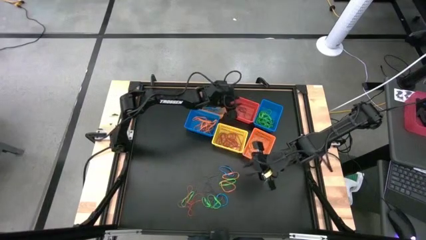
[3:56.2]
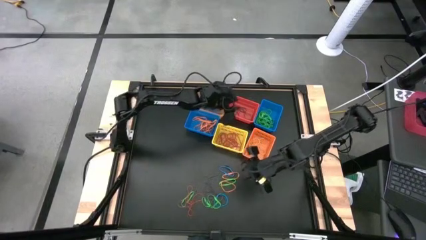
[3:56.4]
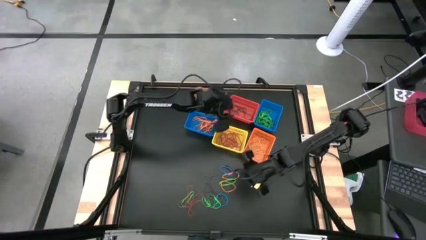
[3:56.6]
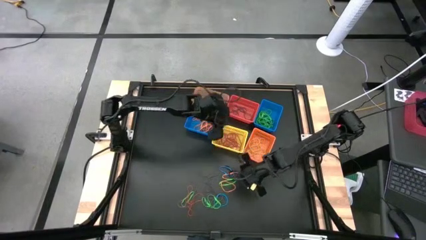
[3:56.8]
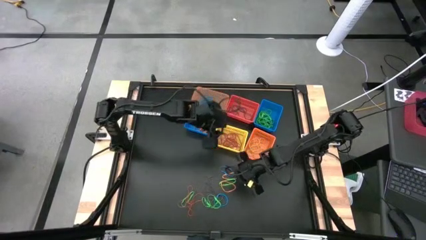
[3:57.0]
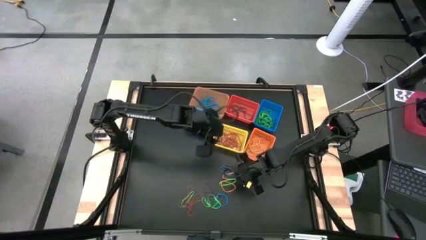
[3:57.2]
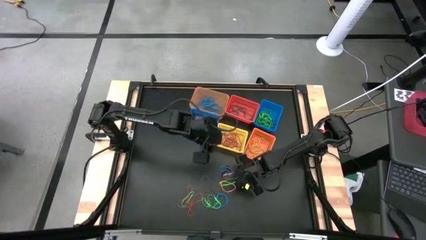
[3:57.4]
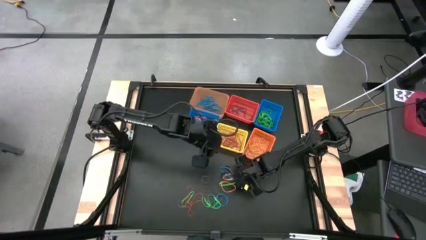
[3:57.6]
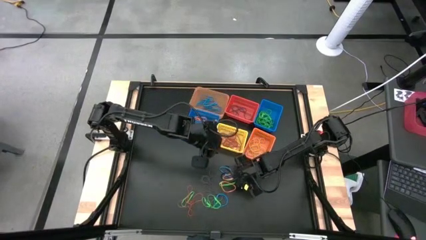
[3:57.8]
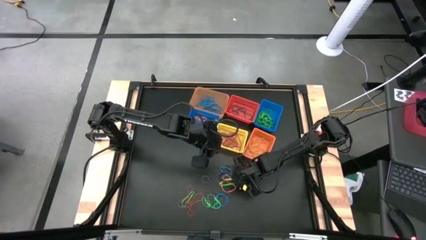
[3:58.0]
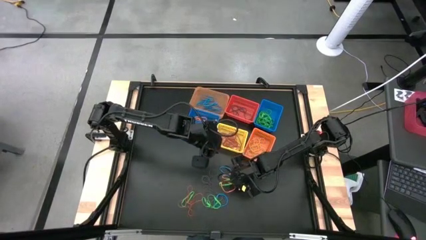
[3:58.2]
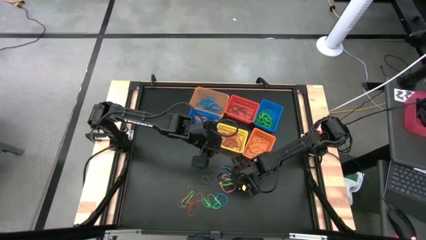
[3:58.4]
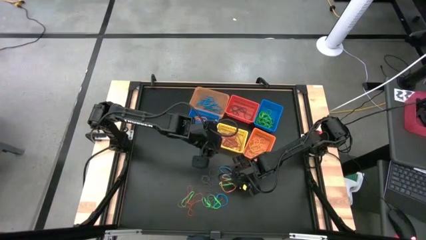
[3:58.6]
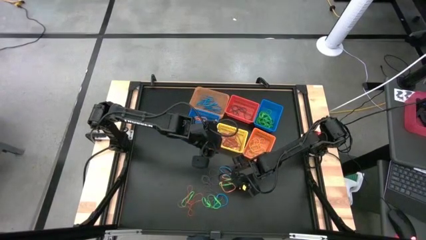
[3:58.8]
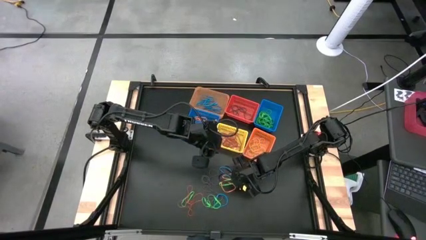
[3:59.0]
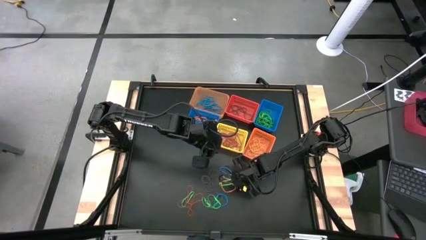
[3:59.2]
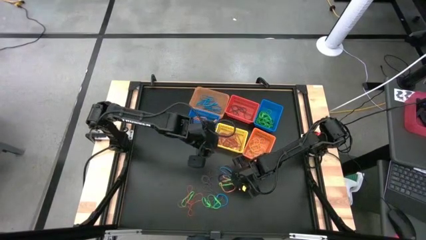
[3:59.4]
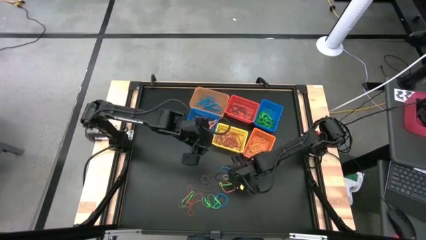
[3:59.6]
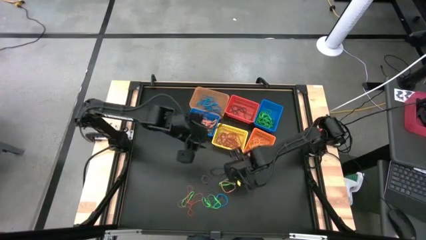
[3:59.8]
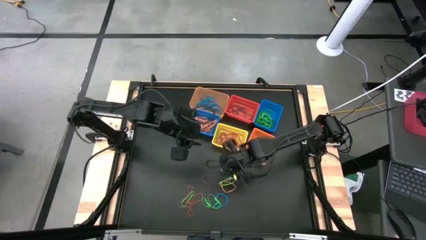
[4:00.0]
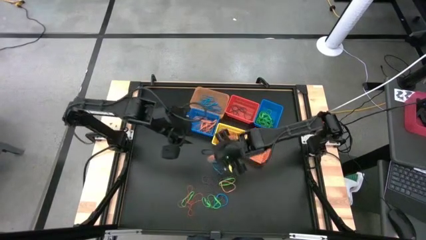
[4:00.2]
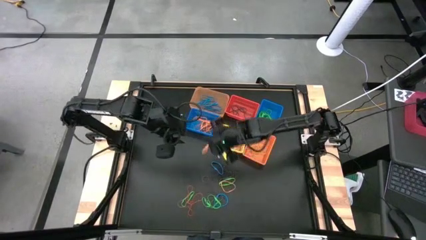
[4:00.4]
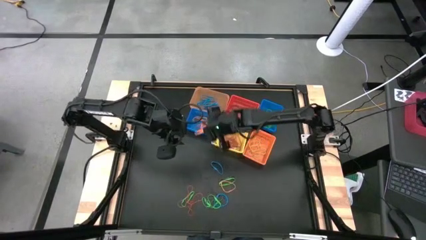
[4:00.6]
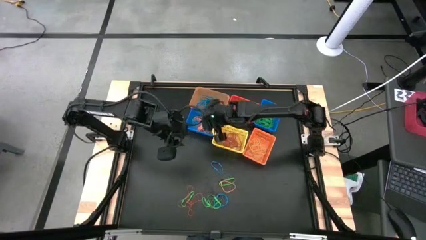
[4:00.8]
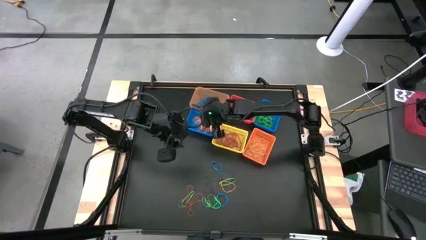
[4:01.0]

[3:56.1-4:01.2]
Task: Sort rubber bands into baskets
Put the orange rubber band into the left blue basket

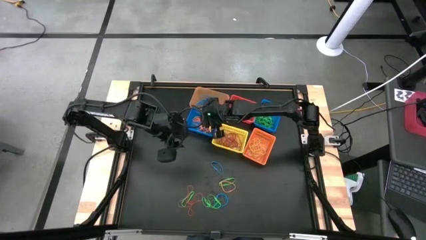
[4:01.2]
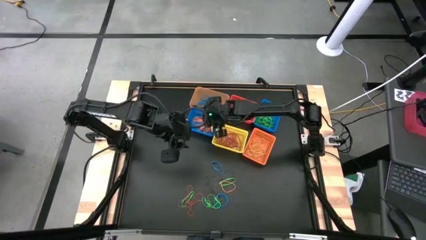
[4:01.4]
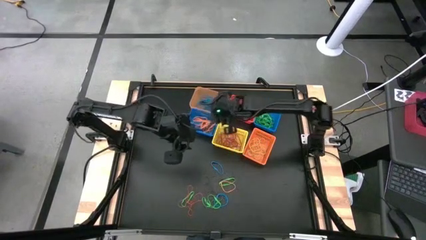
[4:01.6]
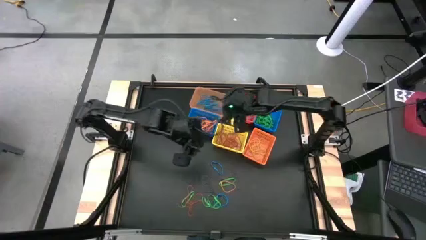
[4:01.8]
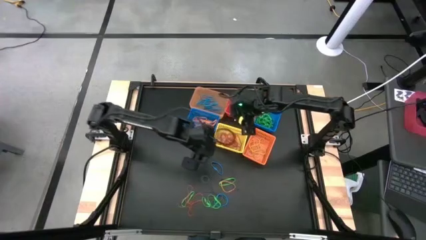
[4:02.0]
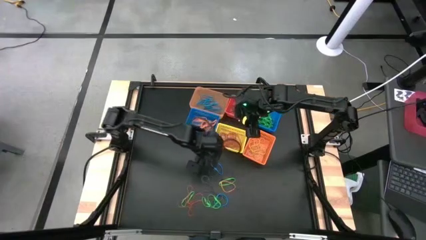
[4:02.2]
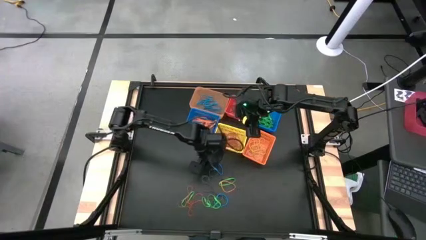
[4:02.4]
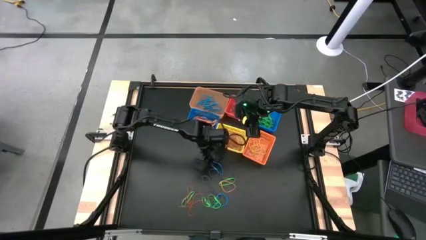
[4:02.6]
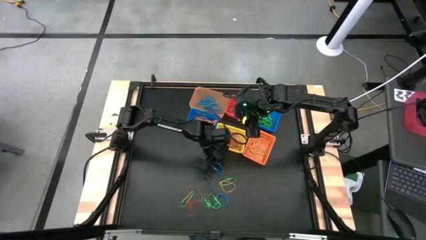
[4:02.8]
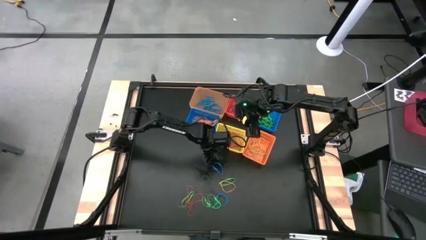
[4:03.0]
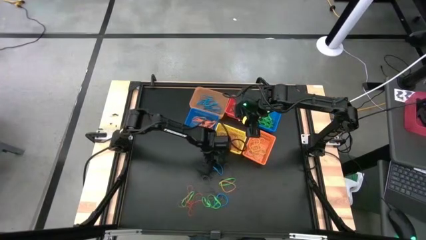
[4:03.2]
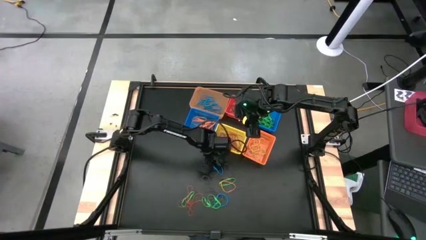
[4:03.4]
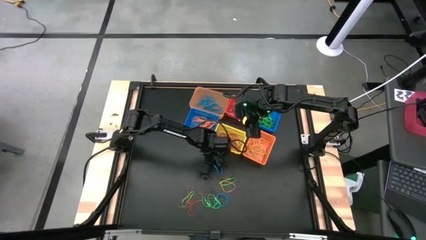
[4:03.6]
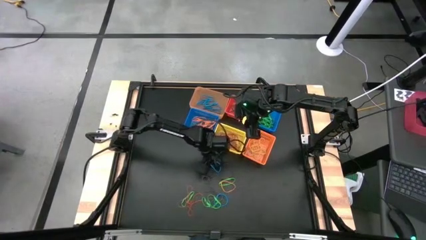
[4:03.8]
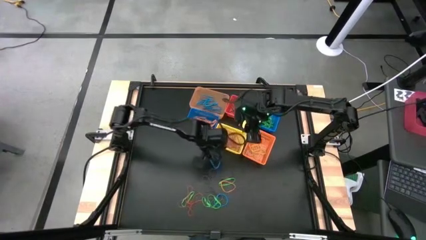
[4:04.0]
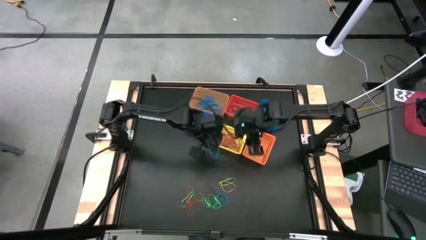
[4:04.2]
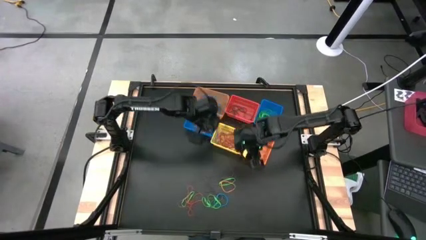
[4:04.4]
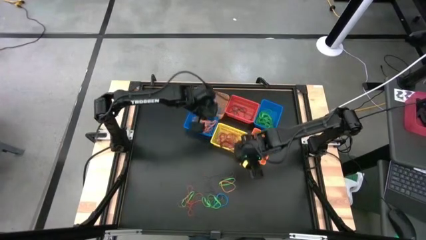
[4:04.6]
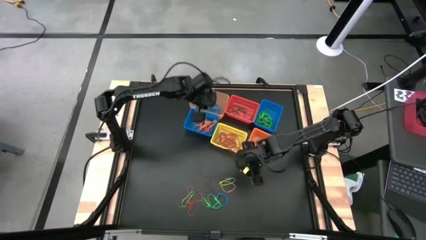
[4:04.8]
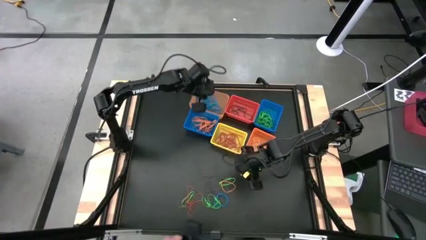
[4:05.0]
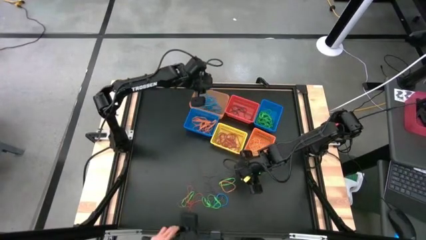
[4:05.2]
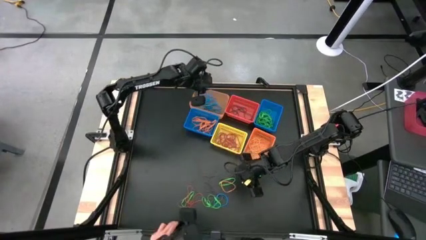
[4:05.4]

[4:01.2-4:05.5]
Put the blue rubber band into the transparent orange basket

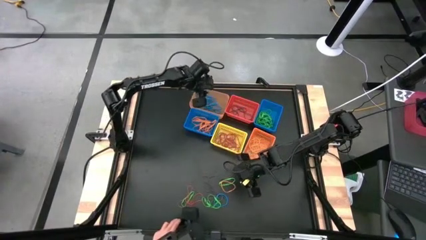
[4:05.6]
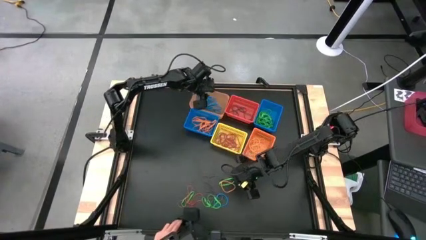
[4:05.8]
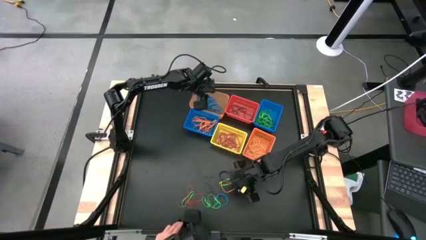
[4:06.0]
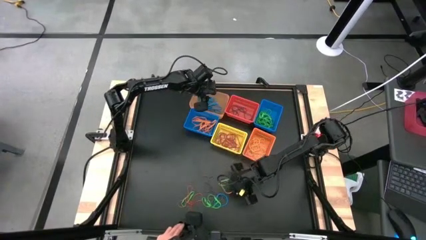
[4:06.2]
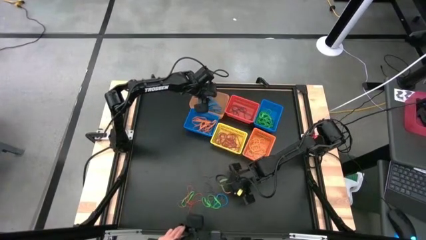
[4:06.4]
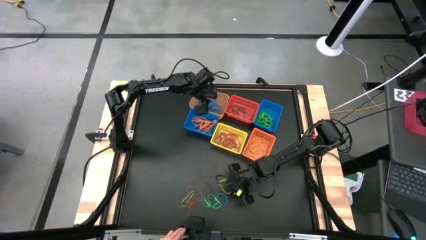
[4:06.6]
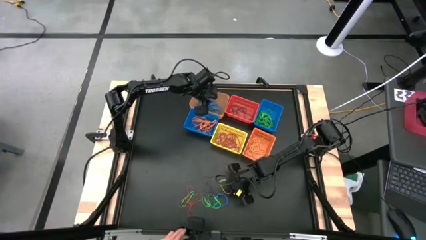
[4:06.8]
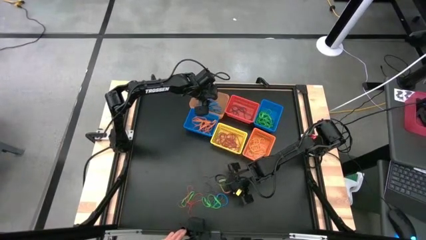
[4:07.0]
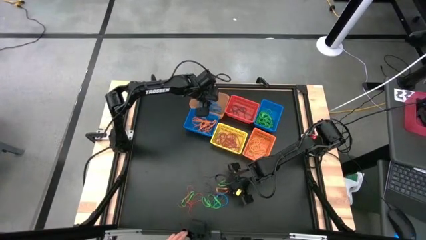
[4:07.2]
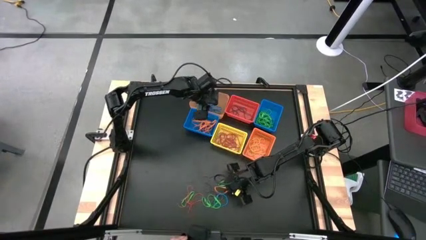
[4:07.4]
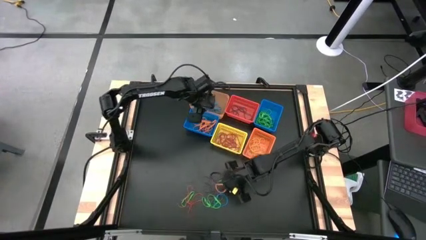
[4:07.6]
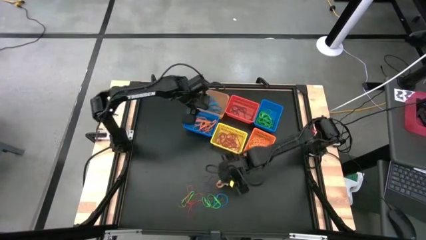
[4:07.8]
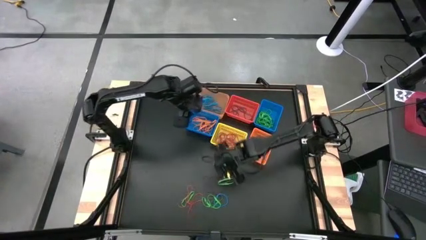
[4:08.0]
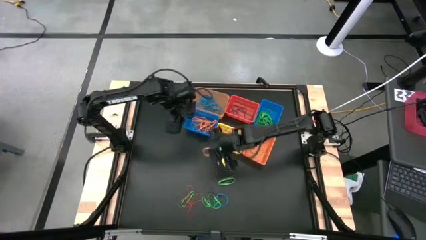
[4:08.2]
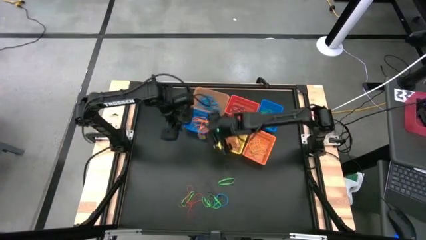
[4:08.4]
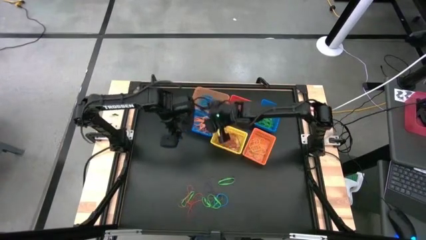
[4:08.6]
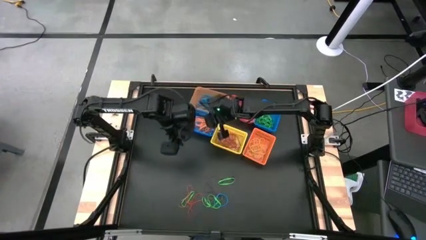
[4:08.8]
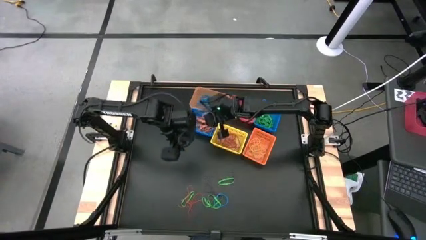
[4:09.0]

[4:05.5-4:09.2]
Put the center orange rubber band into the left blue basket

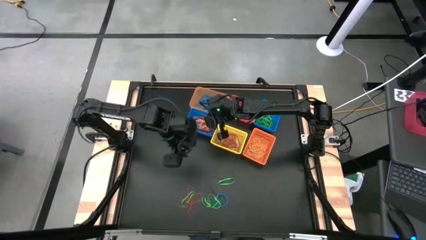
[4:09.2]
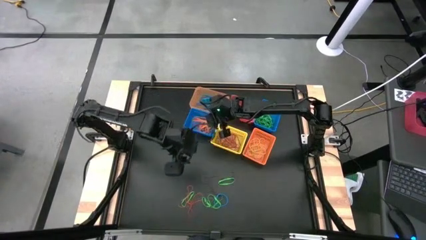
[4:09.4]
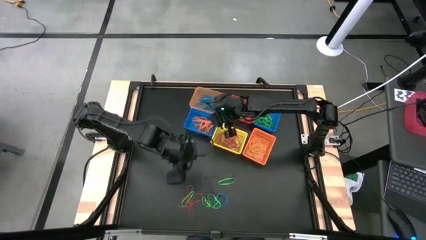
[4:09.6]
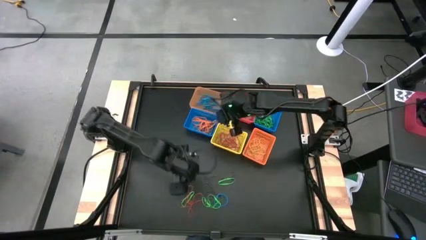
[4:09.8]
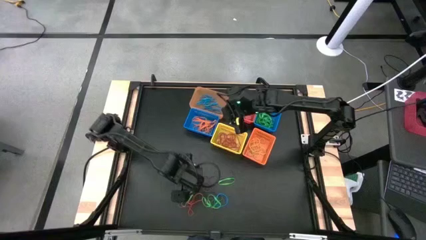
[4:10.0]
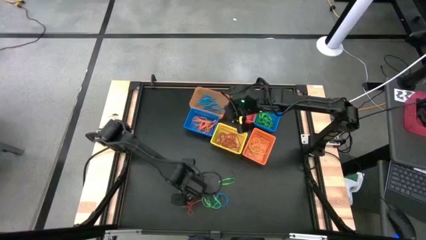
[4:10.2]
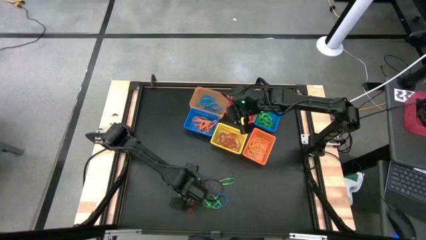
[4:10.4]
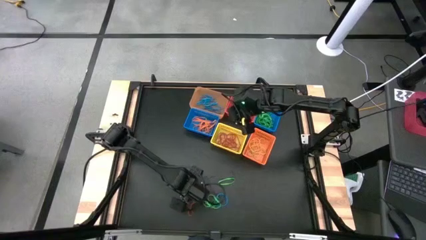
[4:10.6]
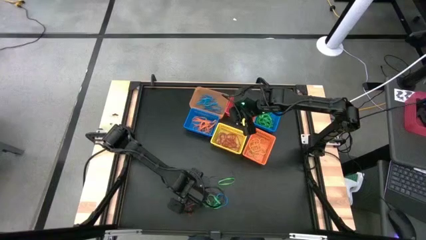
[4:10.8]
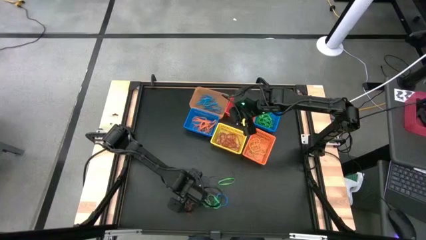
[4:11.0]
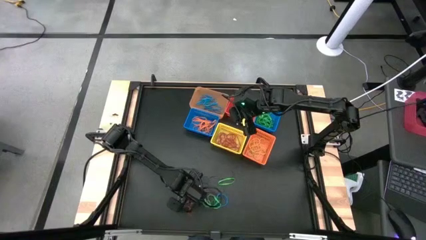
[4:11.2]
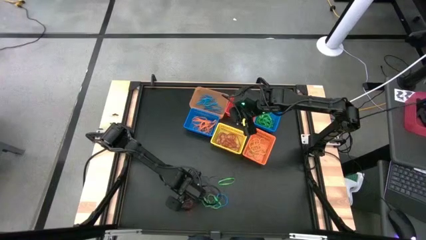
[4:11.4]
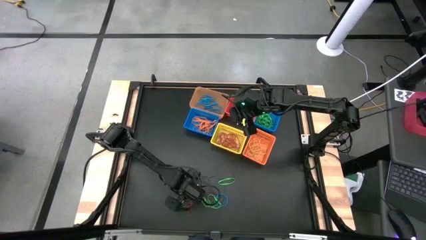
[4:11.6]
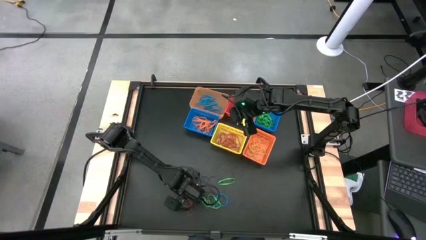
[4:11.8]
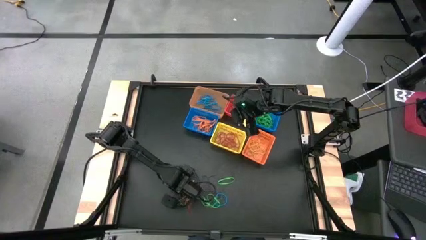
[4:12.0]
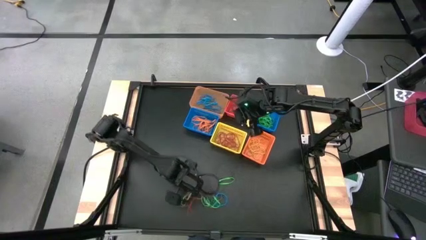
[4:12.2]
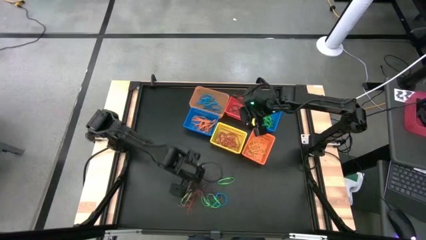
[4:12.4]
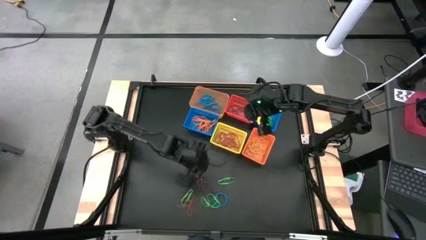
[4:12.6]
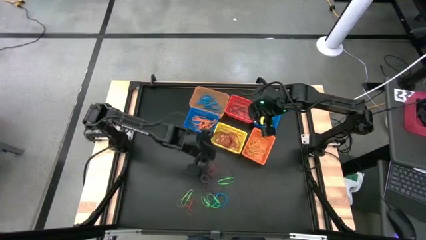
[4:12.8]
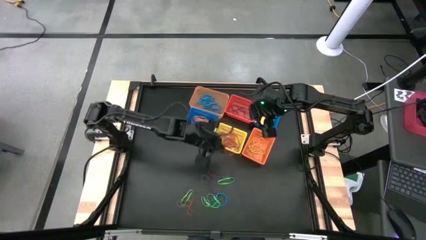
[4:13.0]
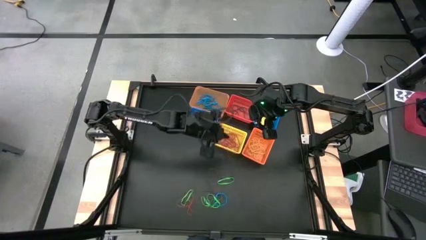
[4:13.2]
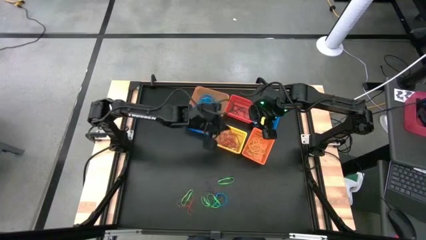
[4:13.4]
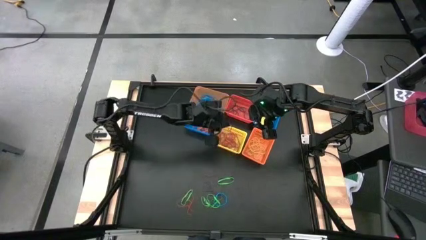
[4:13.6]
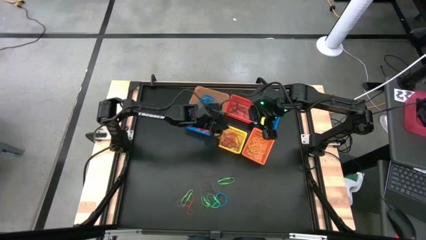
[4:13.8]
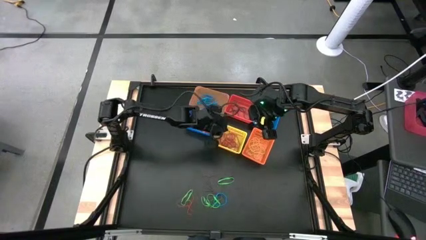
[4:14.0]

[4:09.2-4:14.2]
Put the red rubber band into the yellow basket
